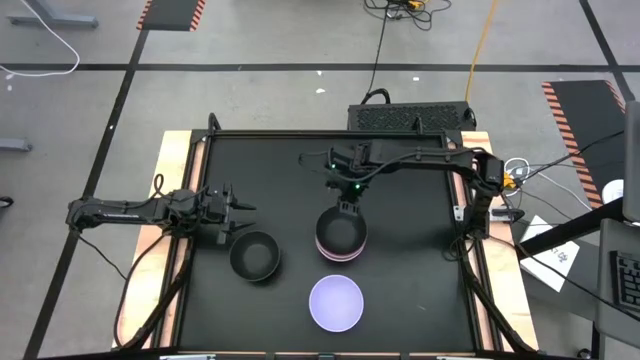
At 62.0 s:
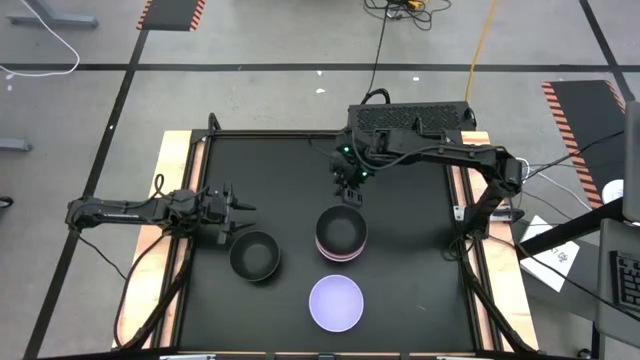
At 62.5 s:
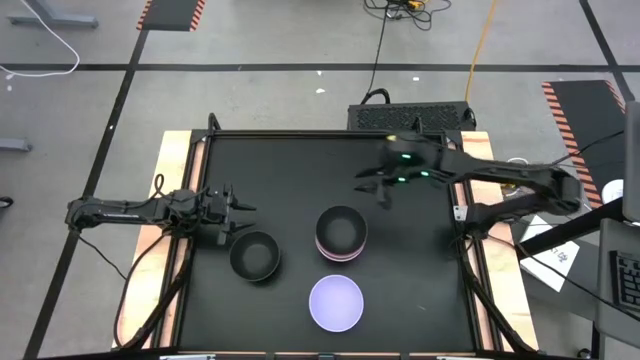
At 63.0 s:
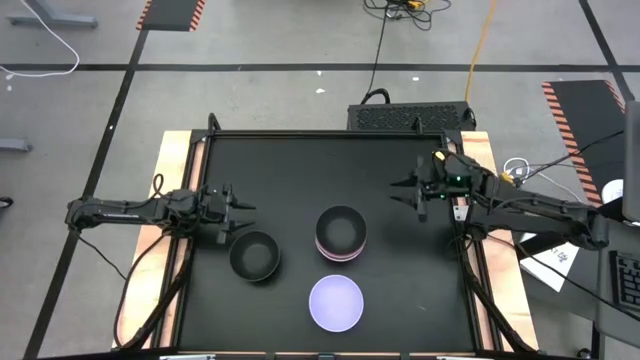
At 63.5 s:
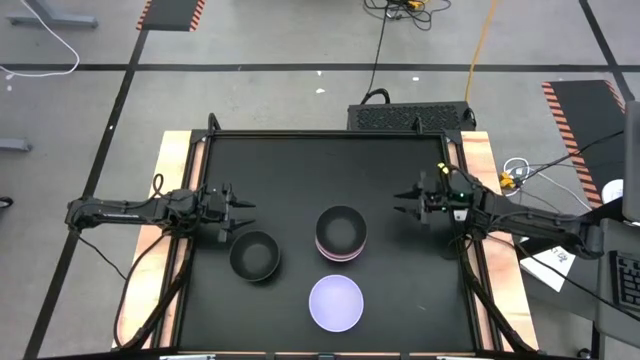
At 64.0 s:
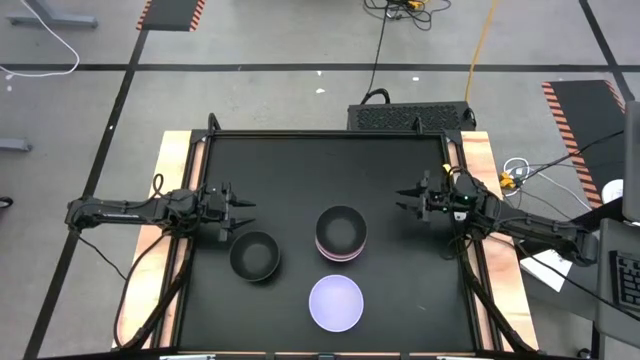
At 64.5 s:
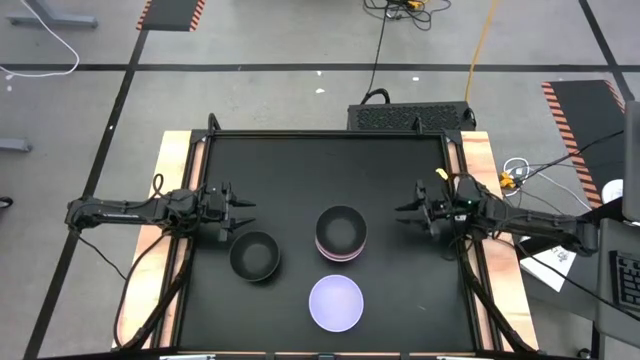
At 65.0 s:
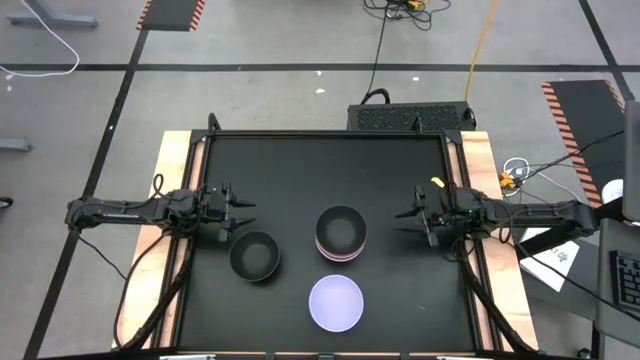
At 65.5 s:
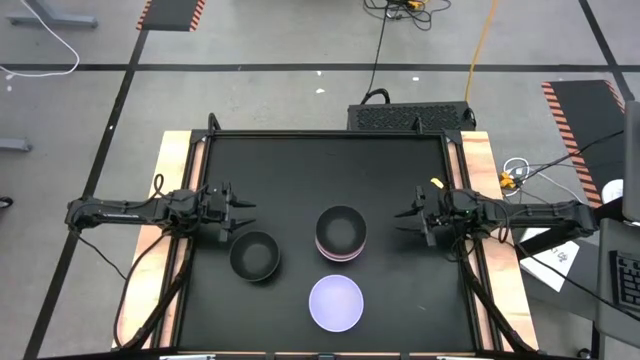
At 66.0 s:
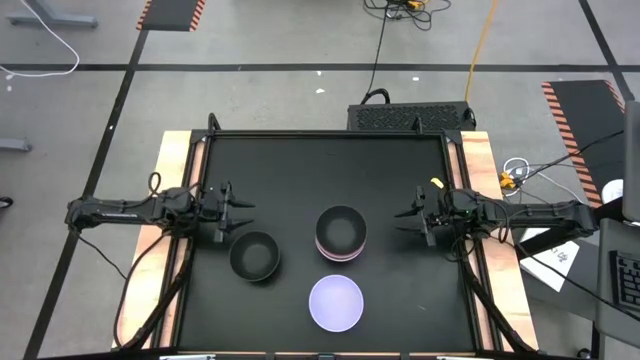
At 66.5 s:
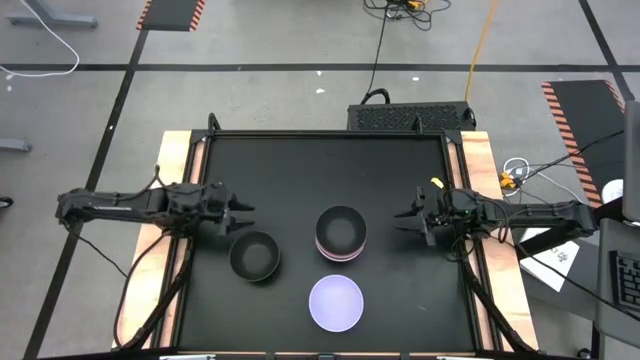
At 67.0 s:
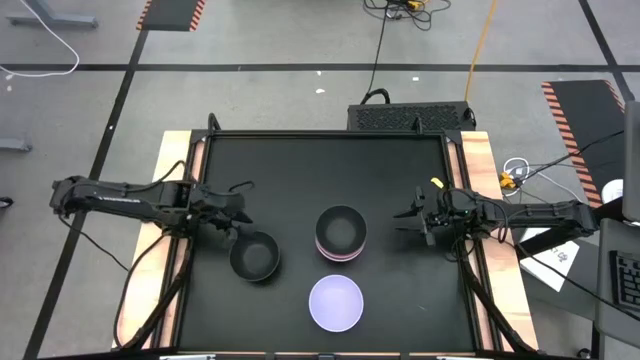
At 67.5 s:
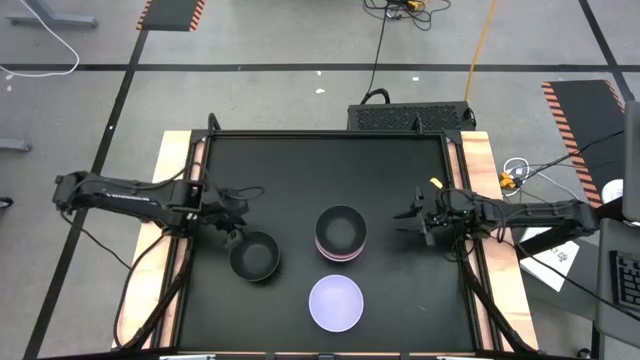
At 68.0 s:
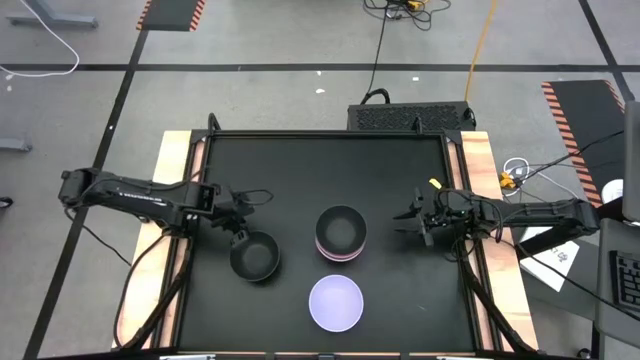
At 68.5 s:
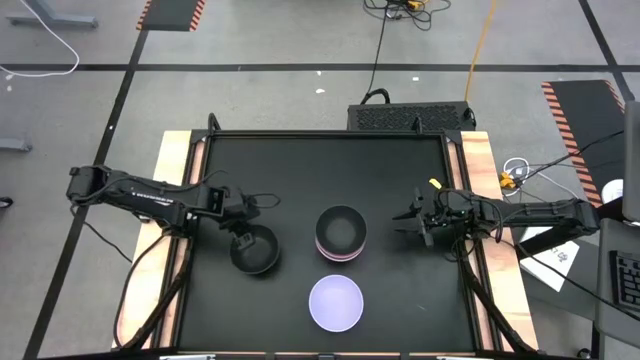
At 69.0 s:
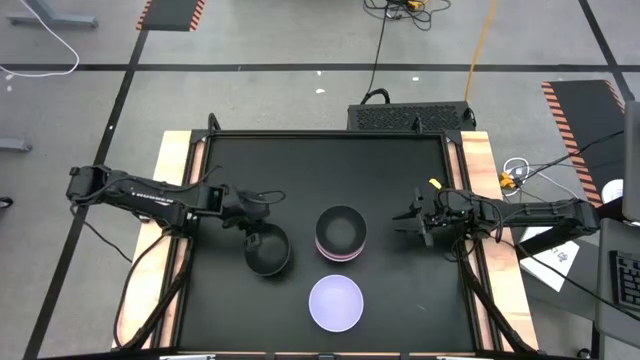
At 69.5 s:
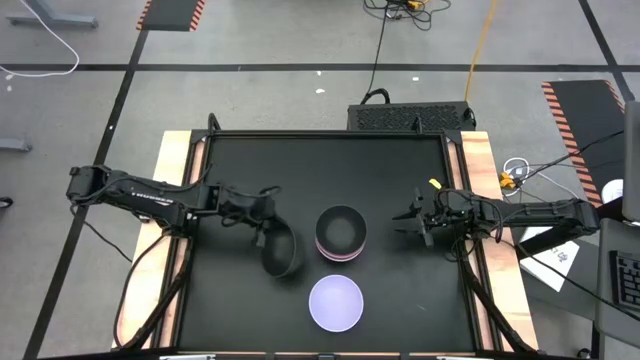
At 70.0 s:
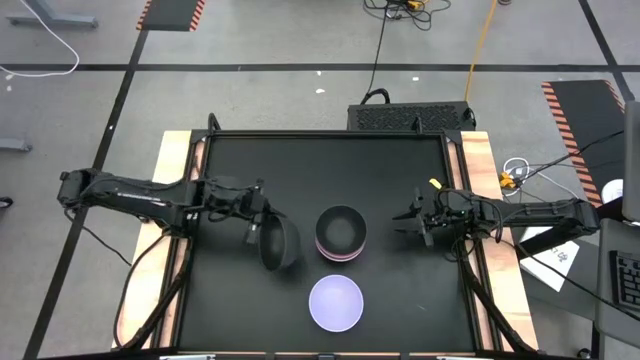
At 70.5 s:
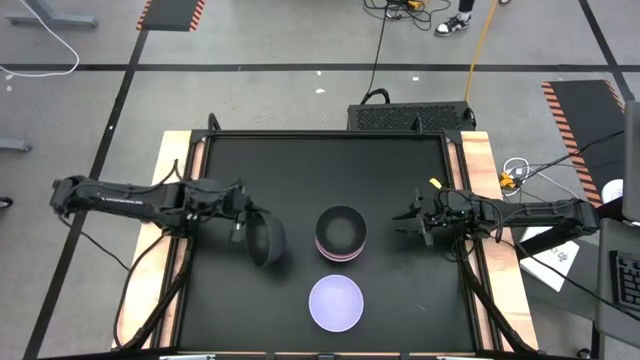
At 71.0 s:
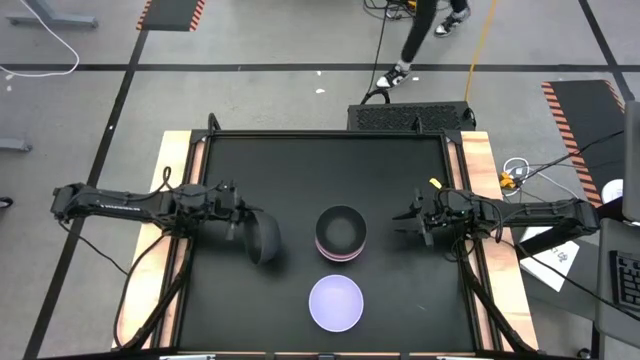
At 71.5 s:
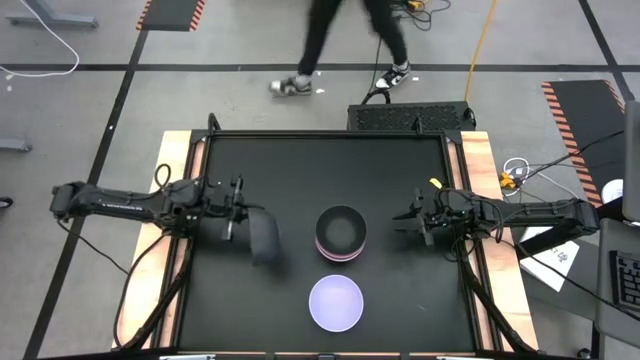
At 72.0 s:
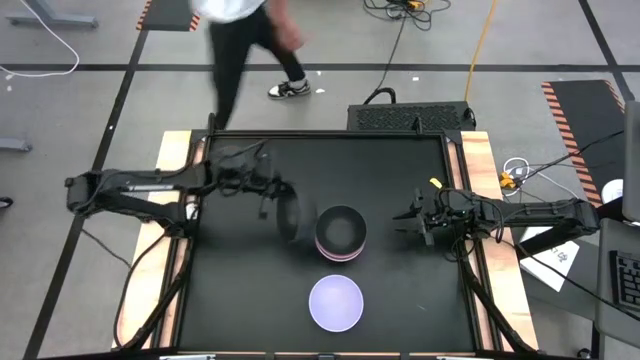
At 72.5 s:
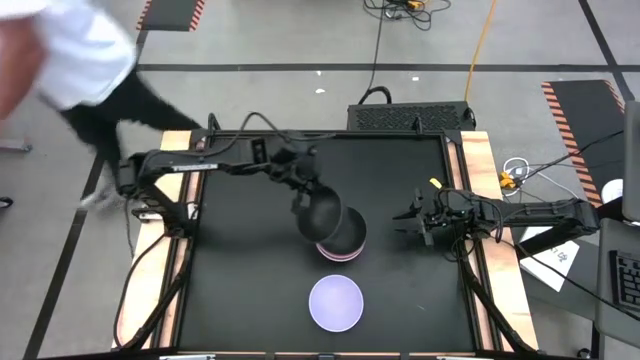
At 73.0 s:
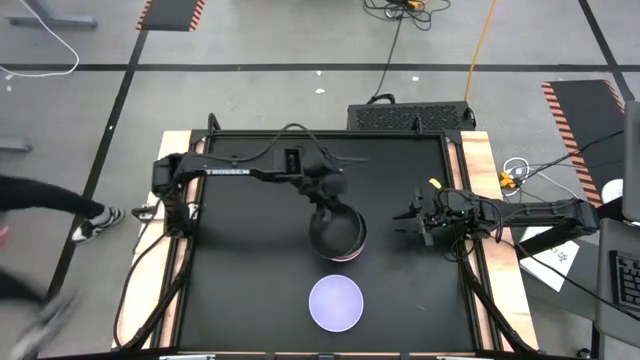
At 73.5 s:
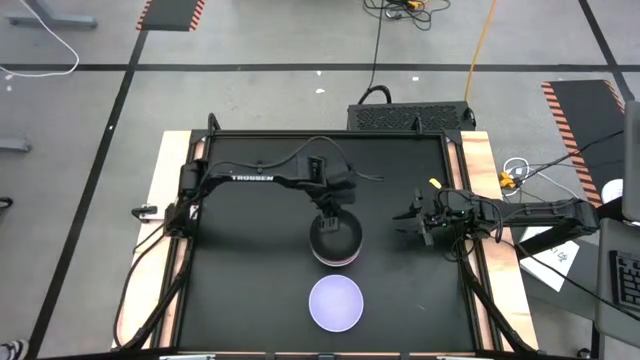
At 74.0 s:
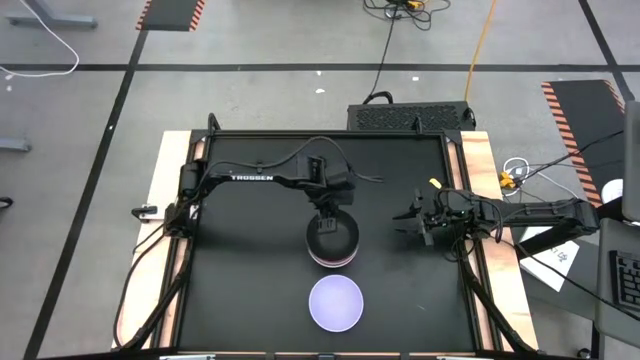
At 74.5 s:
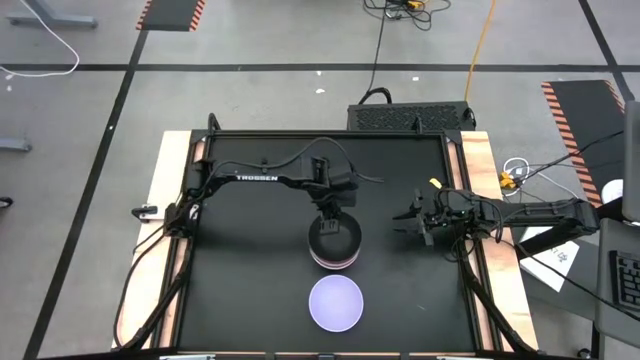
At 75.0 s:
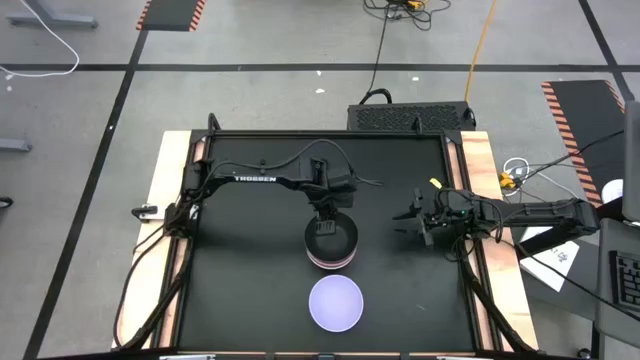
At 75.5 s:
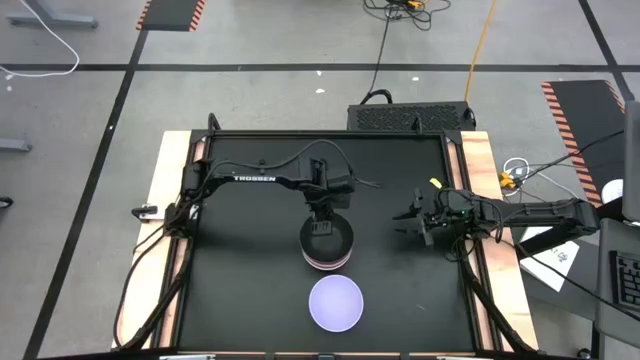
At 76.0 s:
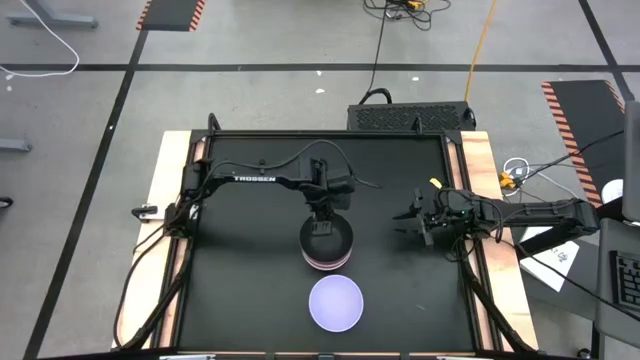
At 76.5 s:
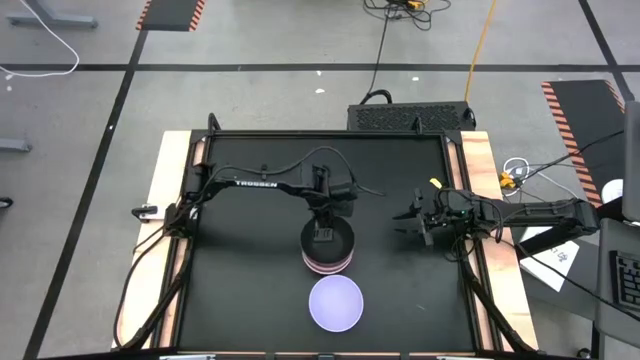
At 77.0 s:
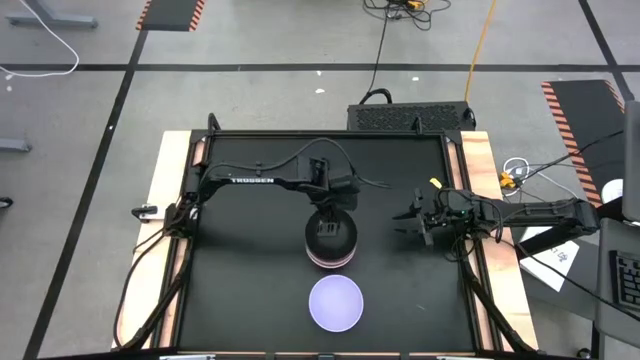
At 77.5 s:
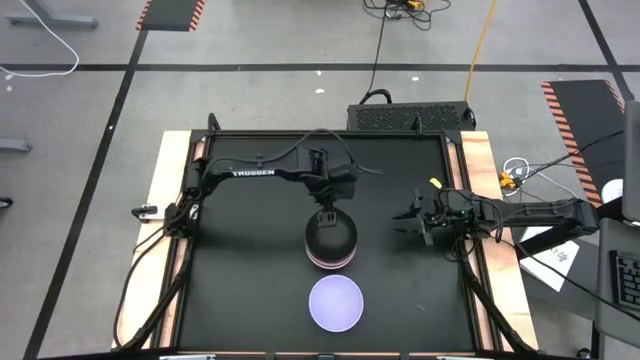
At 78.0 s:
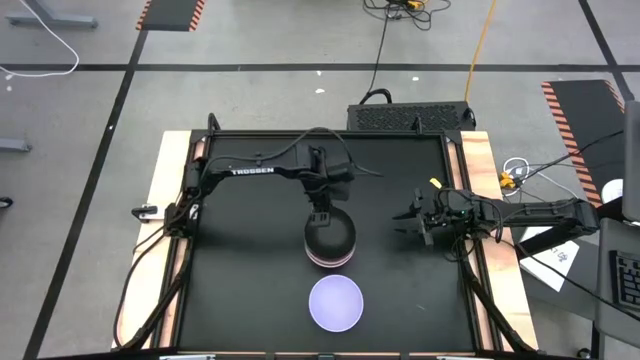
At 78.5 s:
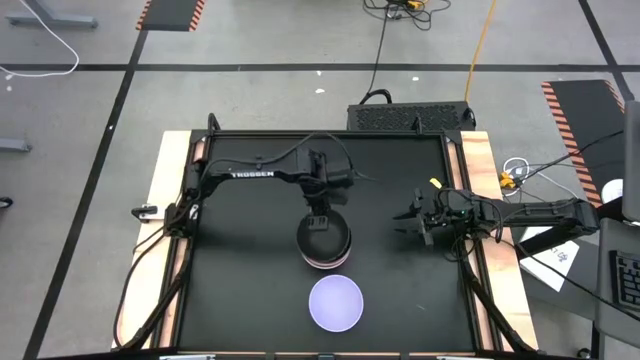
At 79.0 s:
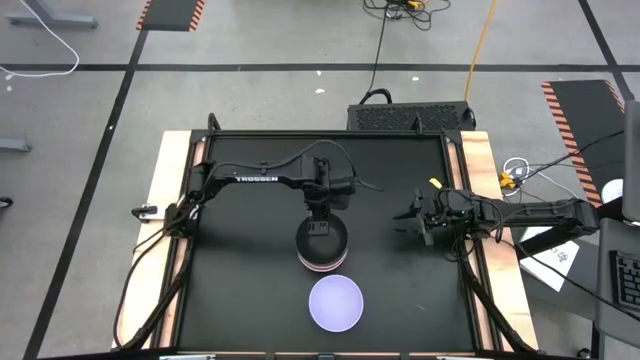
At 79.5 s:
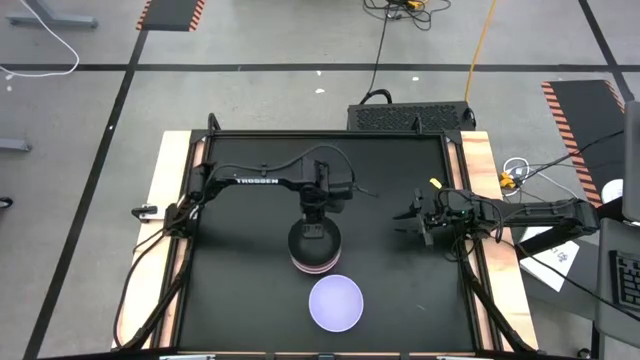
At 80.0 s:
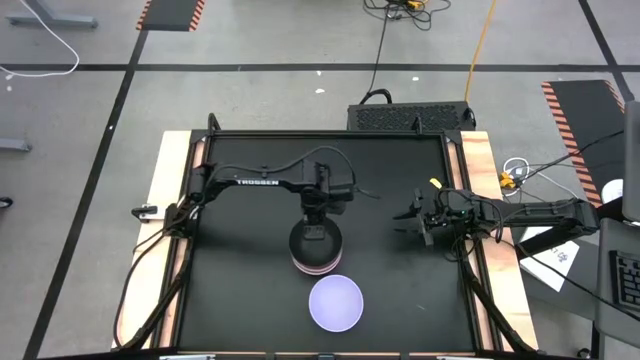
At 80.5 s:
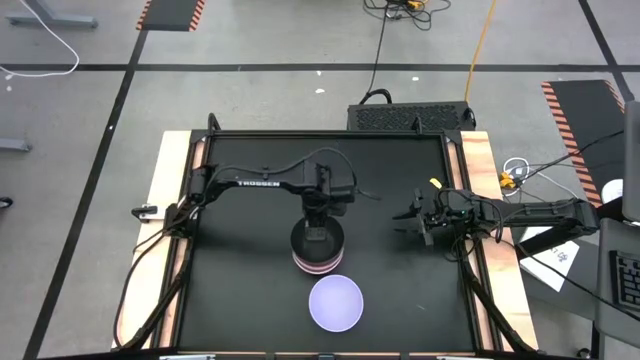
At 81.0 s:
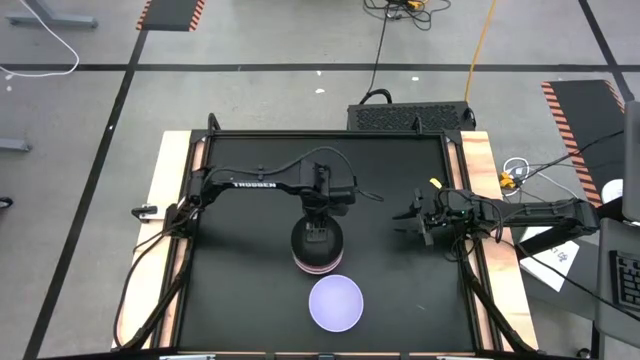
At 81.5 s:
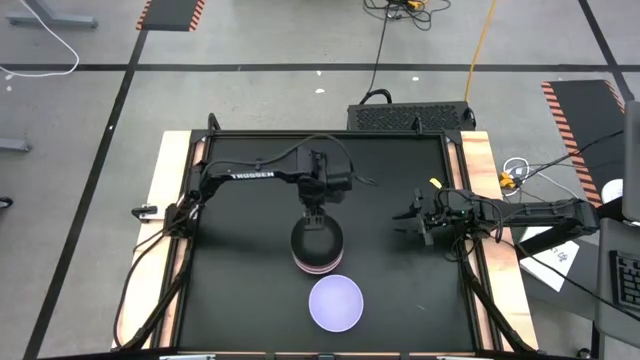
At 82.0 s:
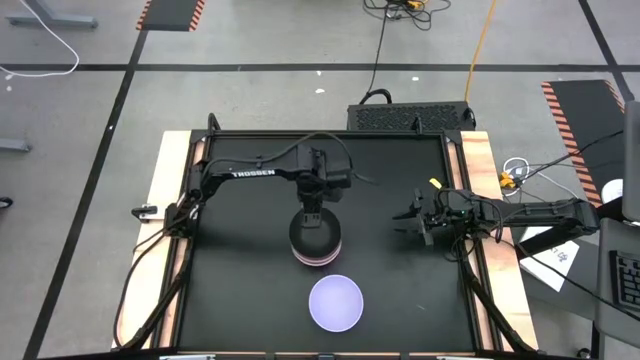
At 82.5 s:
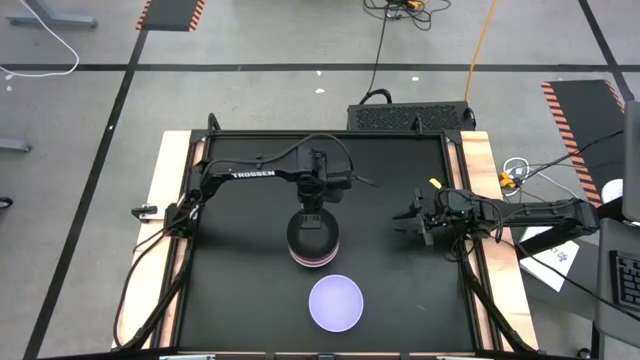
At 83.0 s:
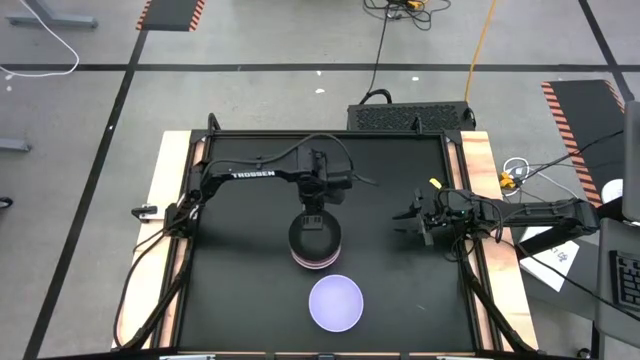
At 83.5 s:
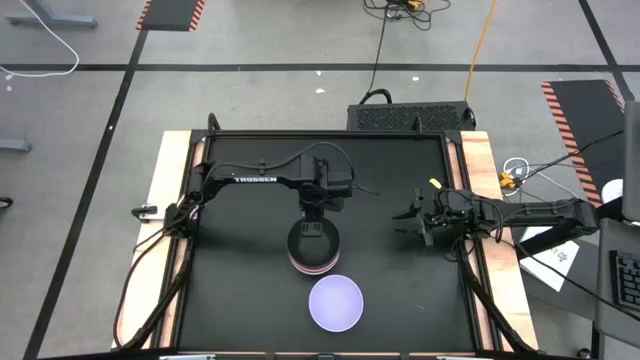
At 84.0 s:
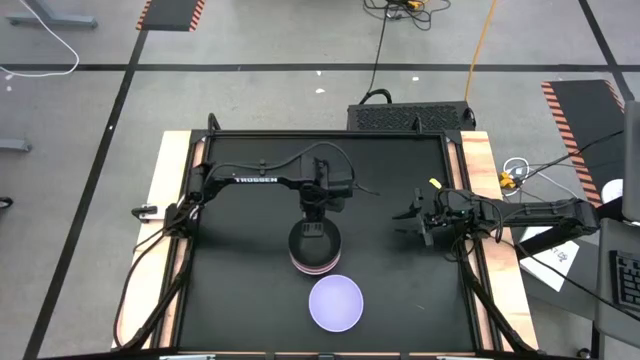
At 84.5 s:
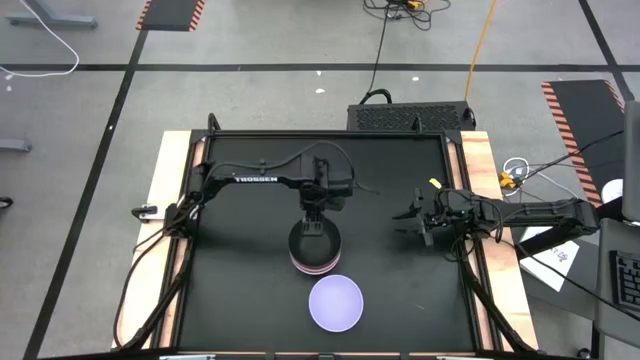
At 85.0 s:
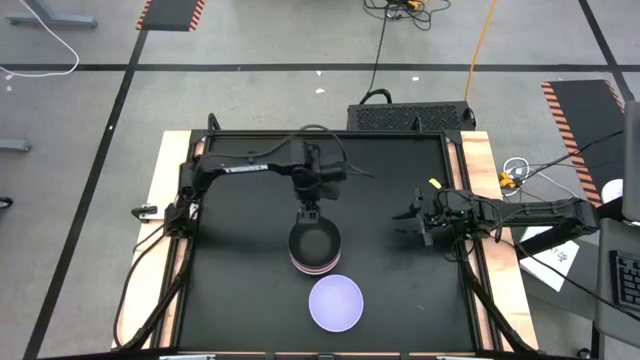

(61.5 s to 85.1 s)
Task: Nest bowls inside each other
Stack the black bowl on top of the black bowl
